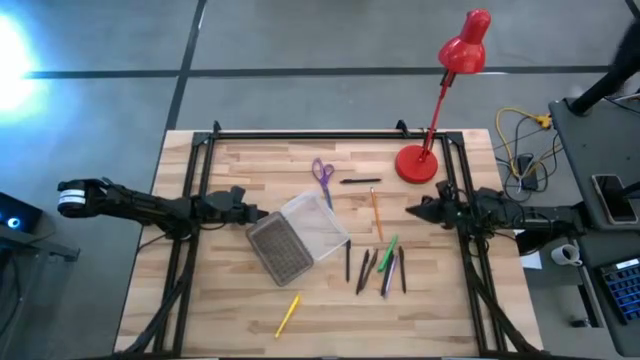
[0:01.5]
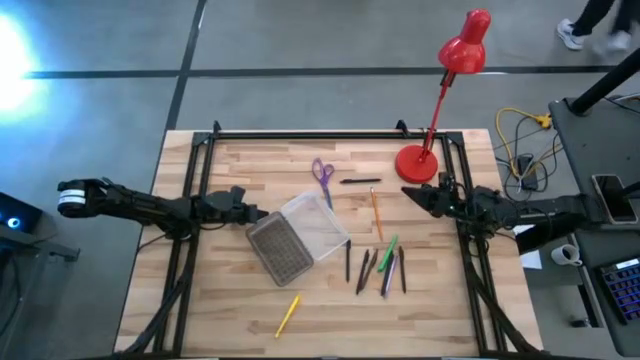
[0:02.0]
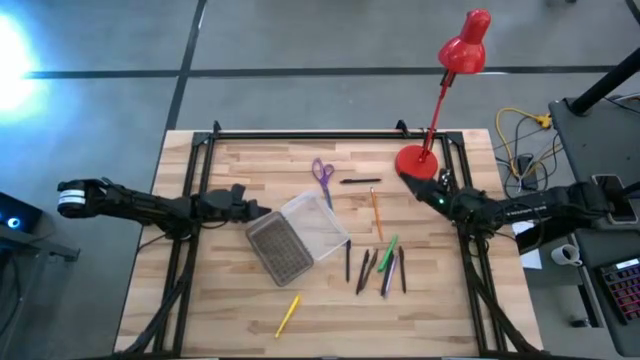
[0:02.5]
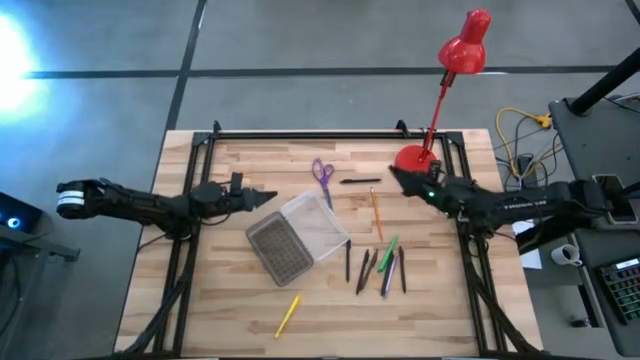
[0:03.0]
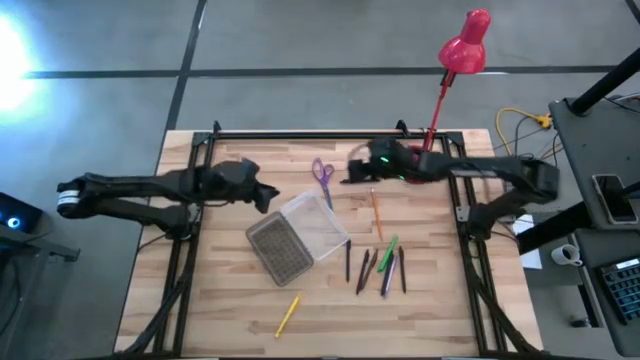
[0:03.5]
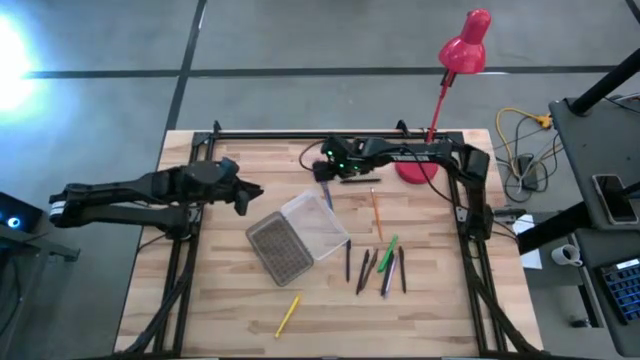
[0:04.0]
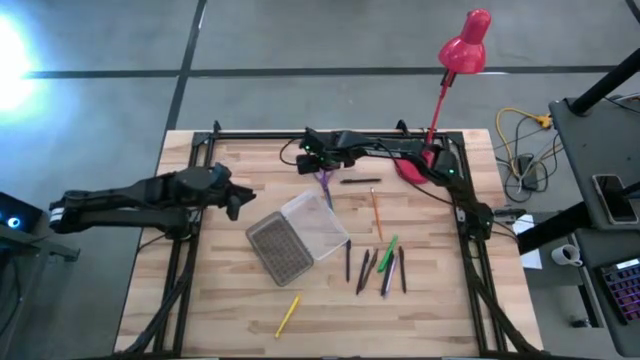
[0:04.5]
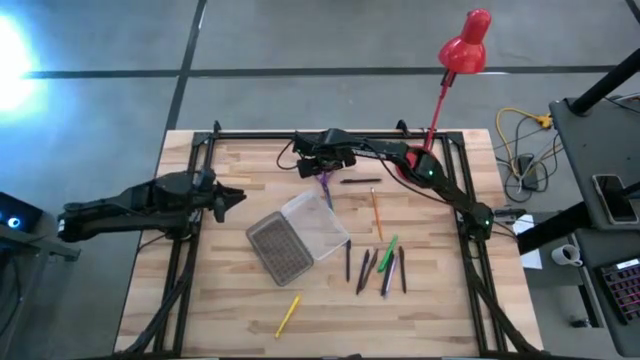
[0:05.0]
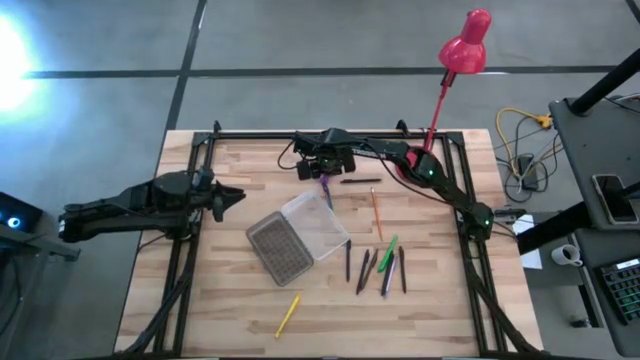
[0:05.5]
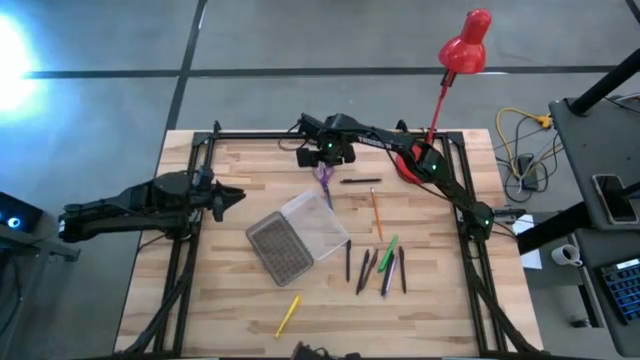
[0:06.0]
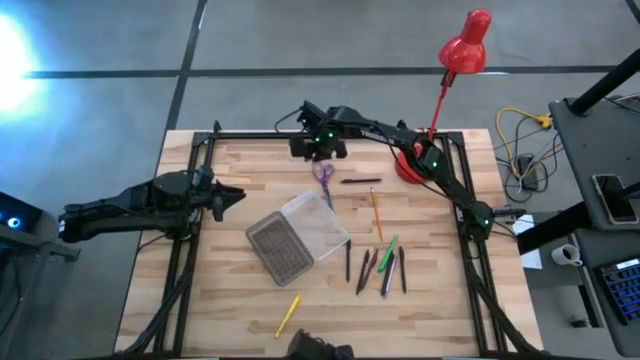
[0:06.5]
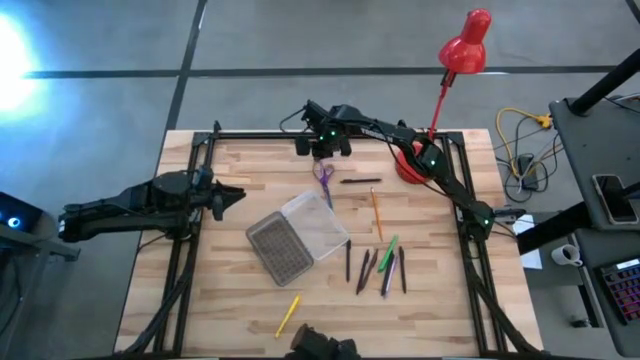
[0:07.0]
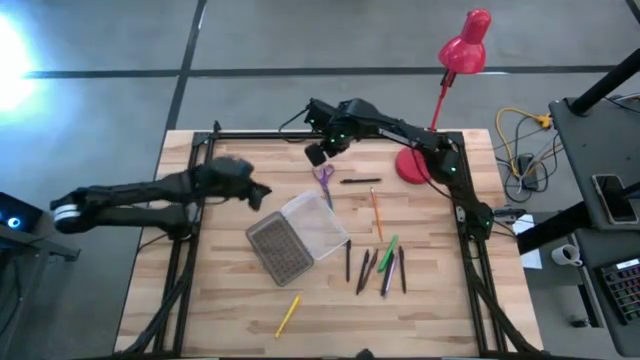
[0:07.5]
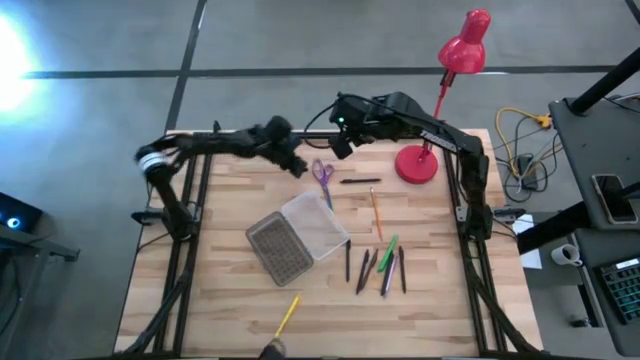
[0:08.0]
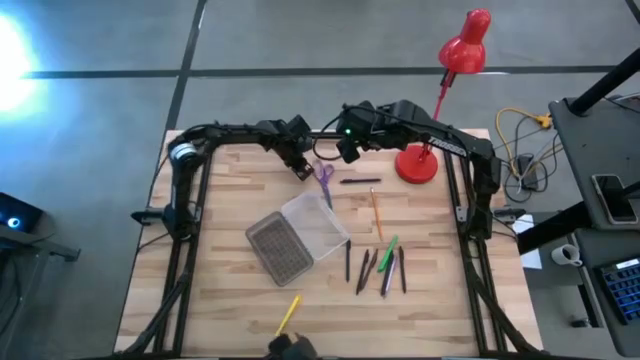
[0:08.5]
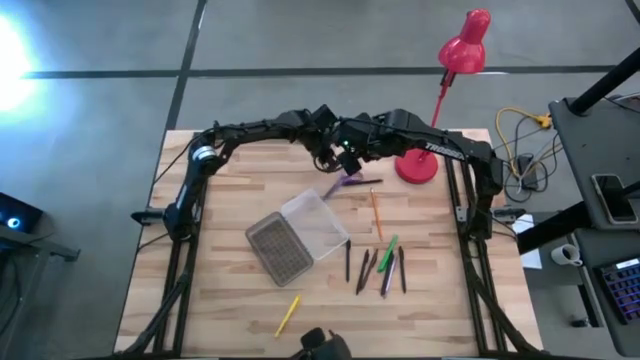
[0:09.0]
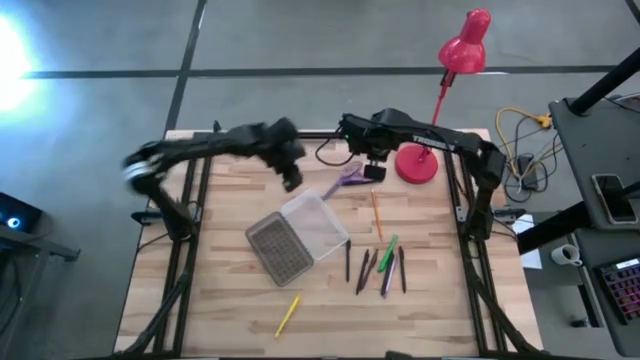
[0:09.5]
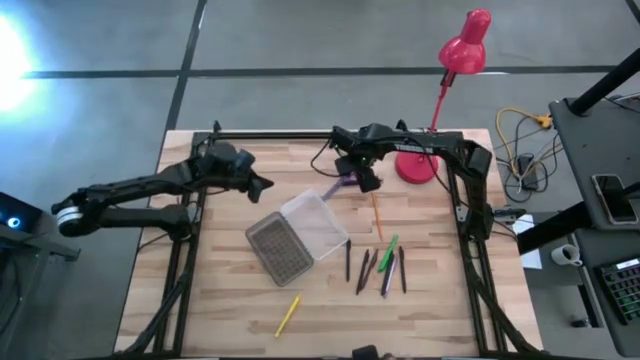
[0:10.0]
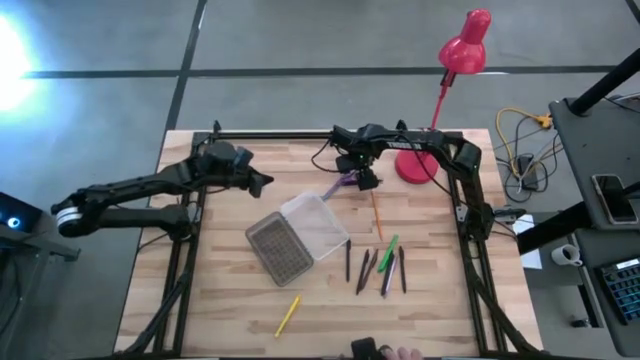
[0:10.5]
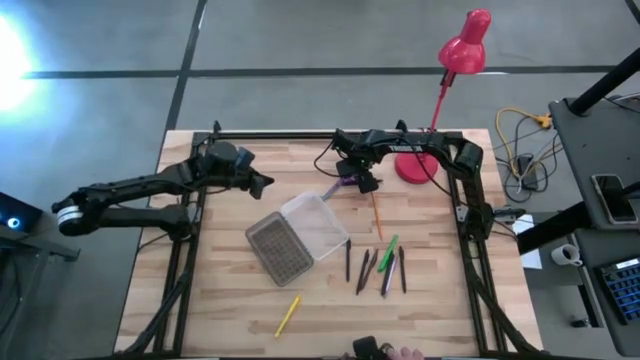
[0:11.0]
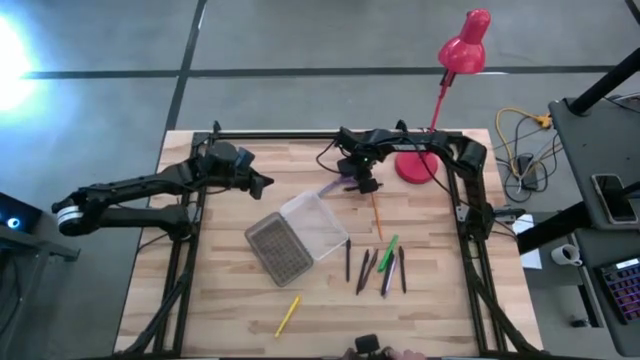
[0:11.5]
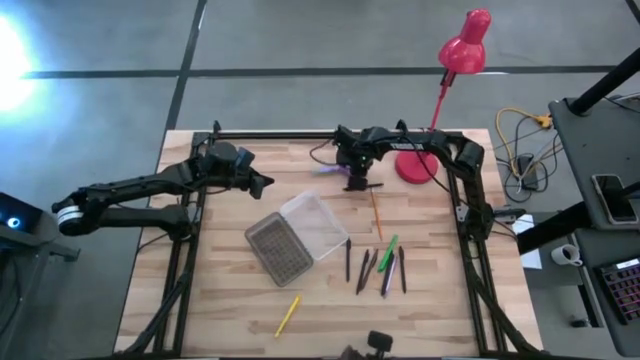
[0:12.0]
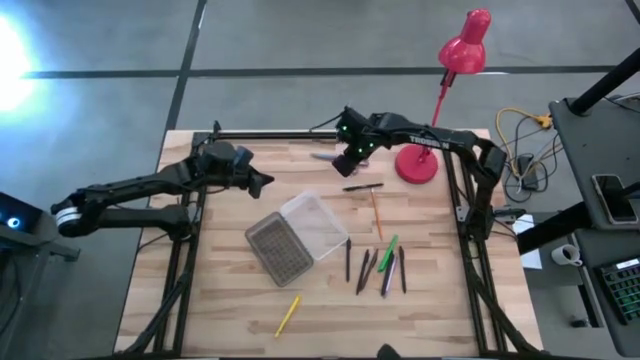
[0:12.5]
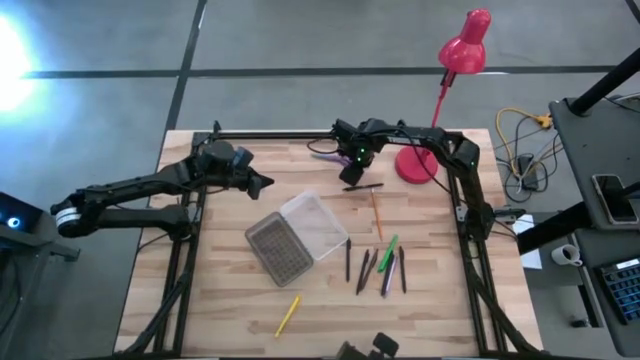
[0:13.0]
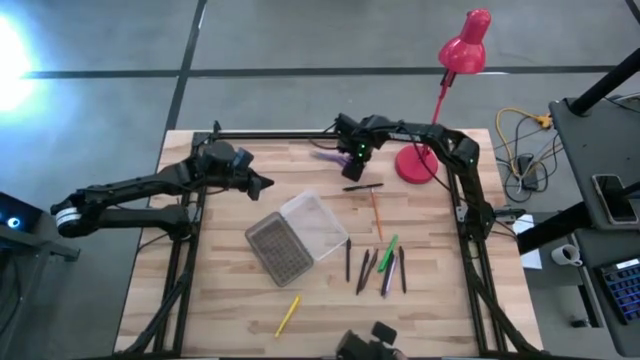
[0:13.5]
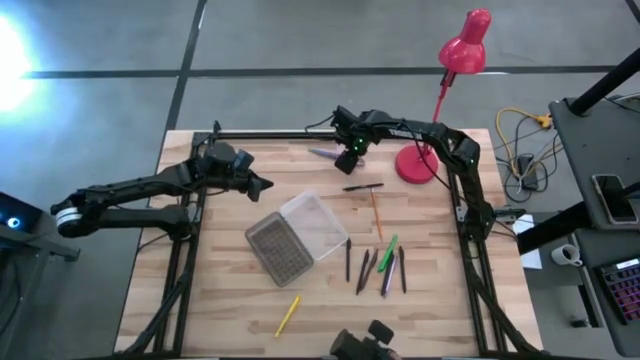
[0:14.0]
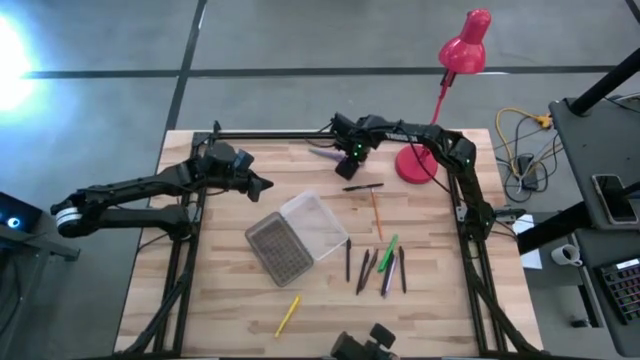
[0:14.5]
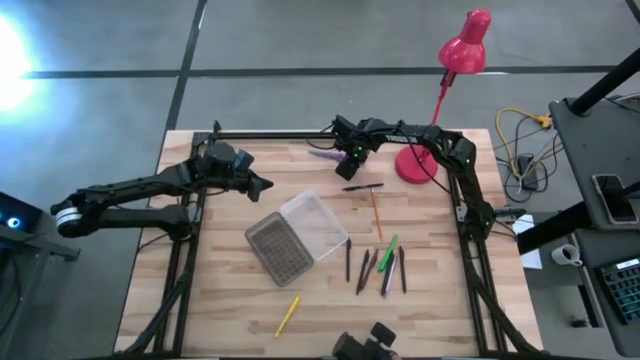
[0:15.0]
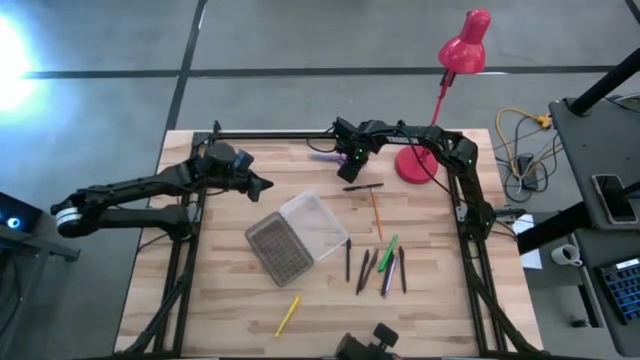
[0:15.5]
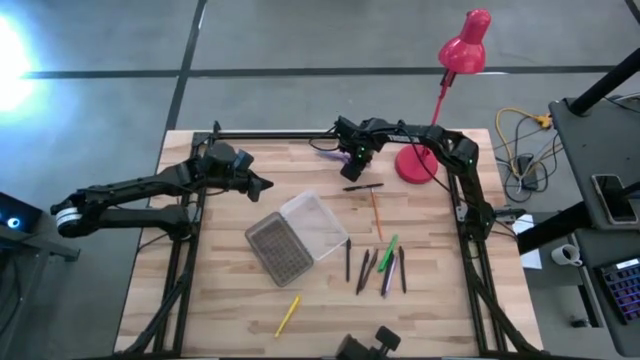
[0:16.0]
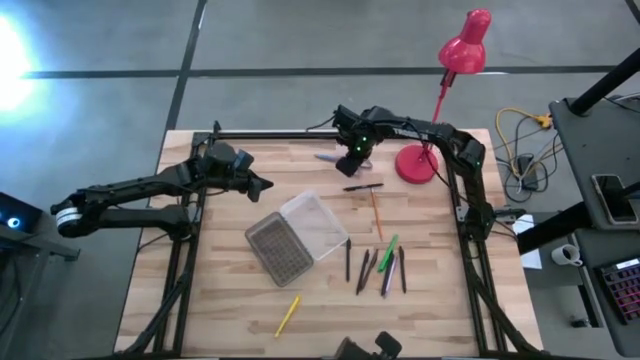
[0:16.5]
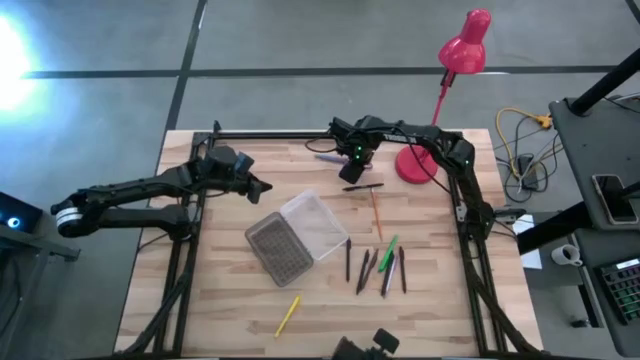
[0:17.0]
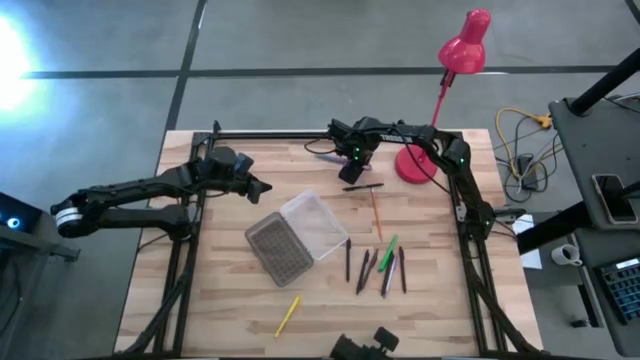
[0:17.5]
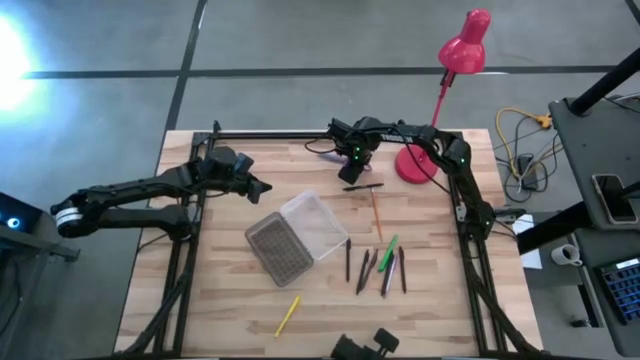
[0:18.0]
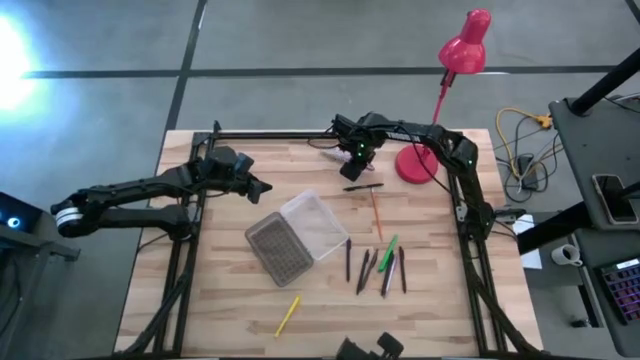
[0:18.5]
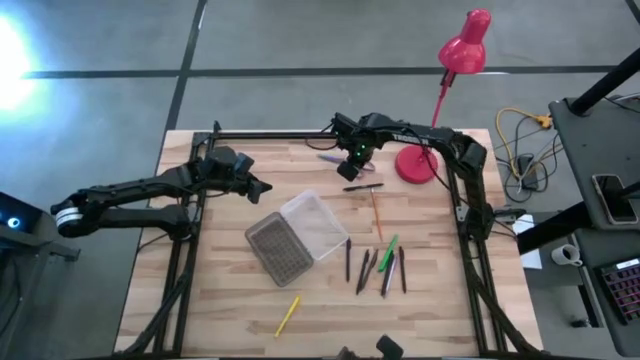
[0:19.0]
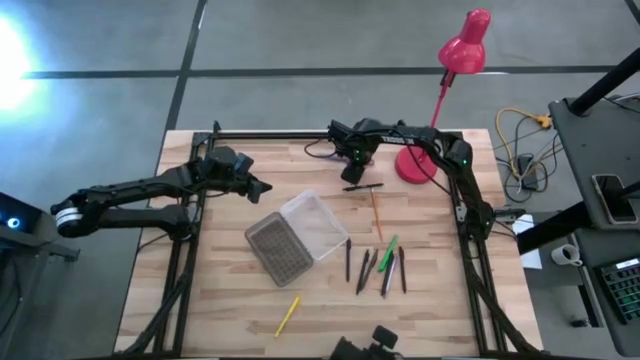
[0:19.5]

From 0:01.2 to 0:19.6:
Task: Pick & place school supplies into a supply box
Put the purple scissors into the gray supply box

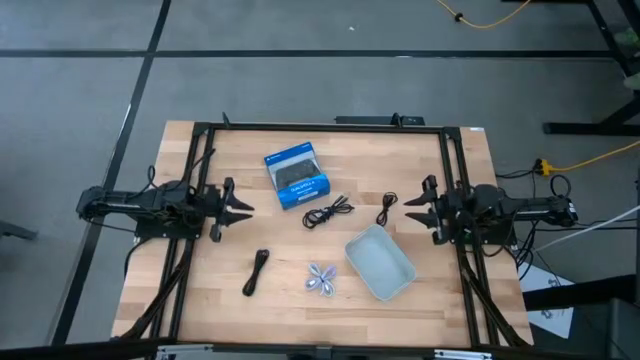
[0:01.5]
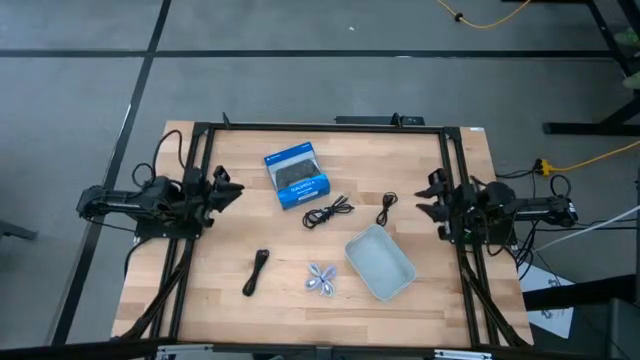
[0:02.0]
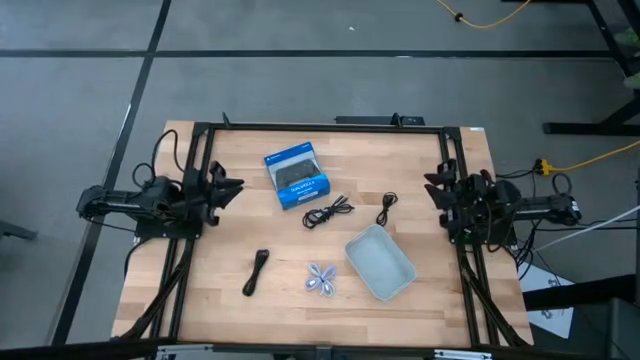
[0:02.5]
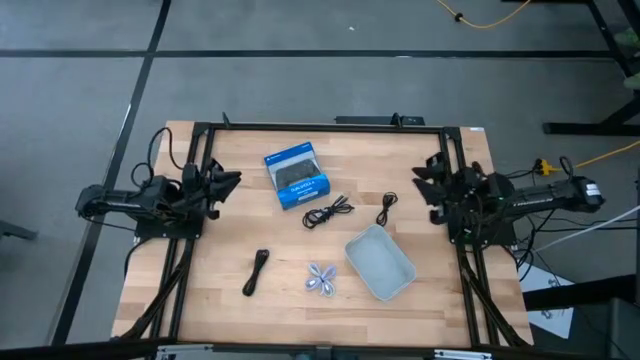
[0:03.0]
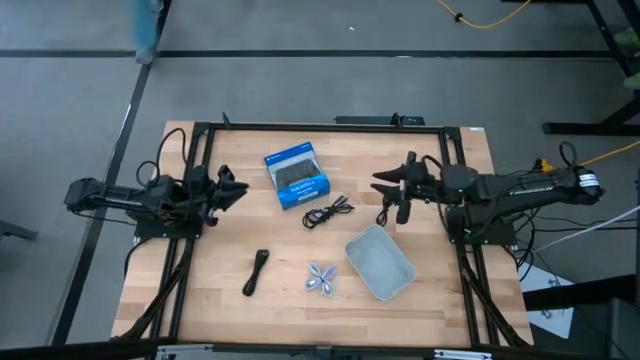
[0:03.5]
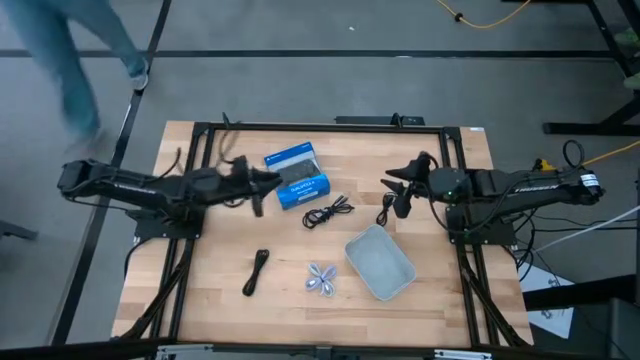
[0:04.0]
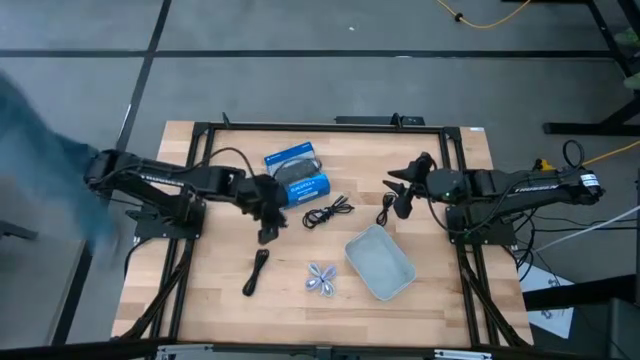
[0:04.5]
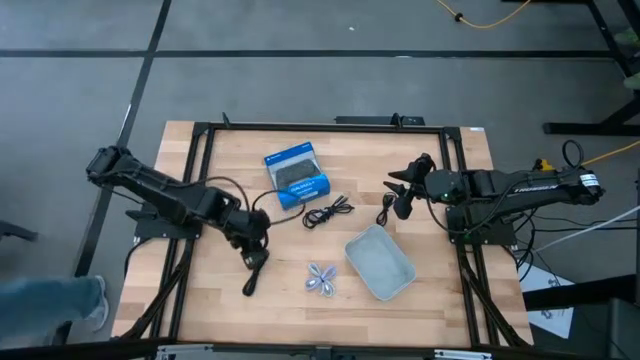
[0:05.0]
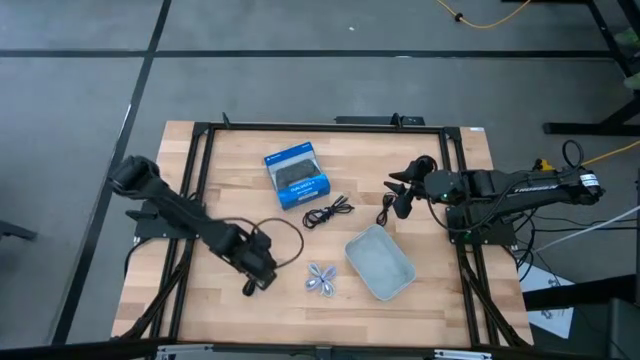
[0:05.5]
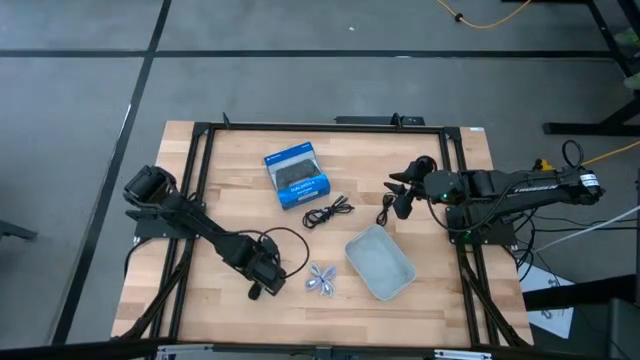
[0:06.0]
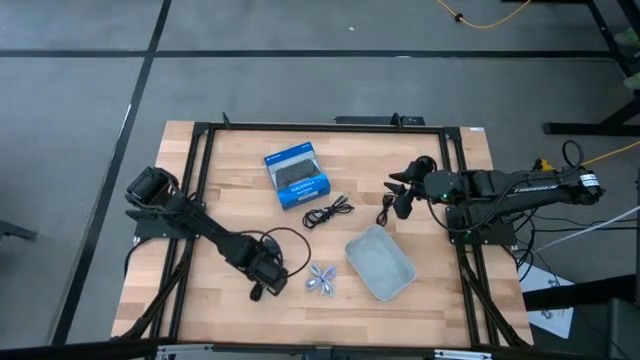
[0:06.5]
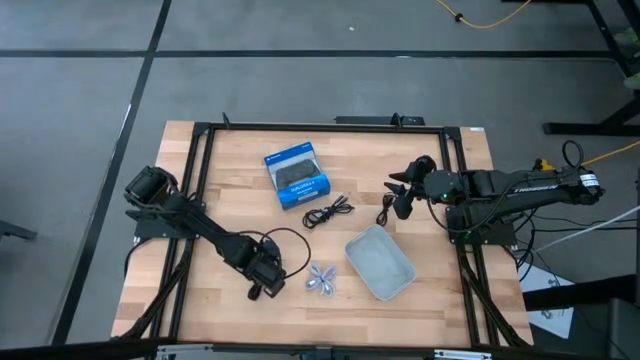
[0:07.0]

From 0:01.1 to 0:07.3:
Task: Pick and place USB-C Cables
Put the bottom black charger cable into the white bin
